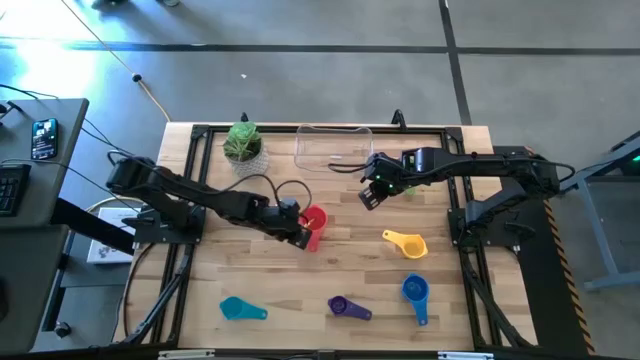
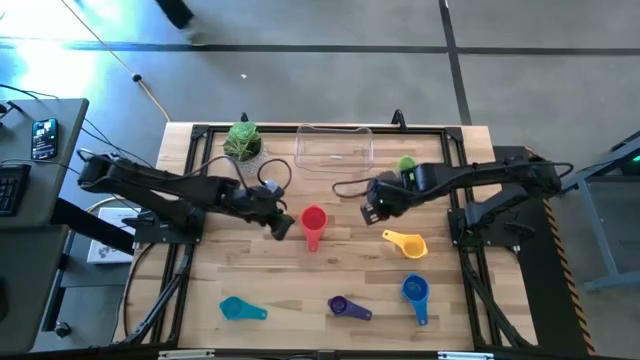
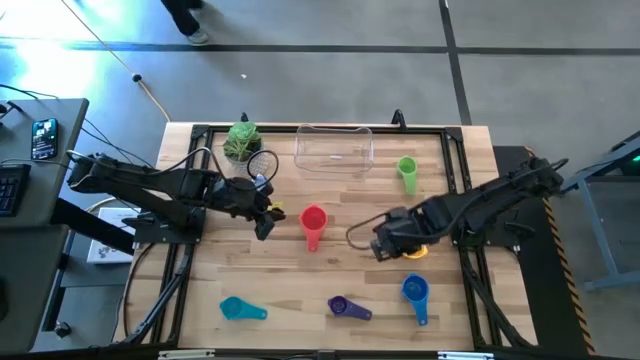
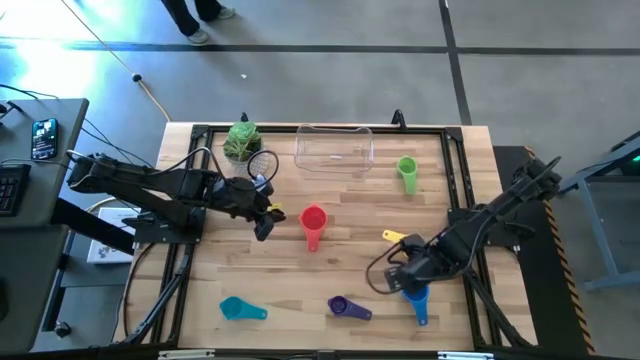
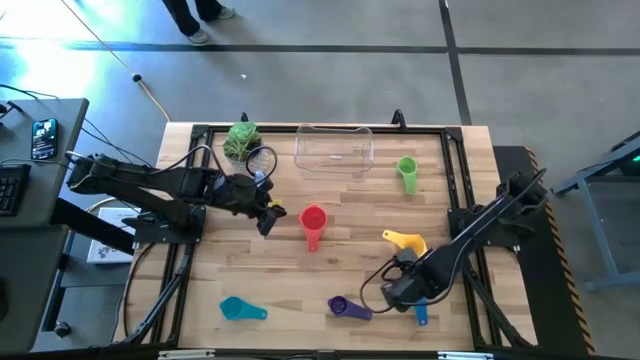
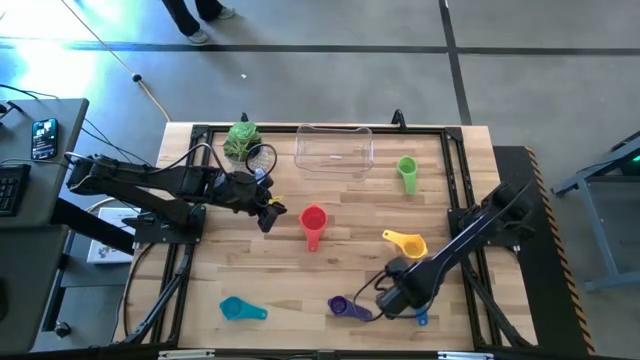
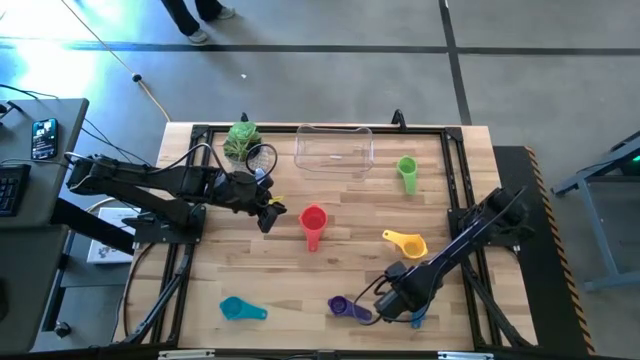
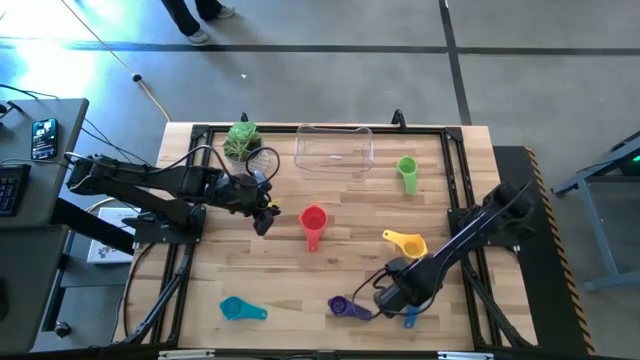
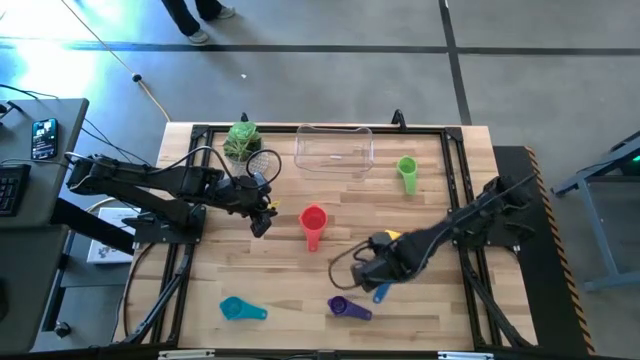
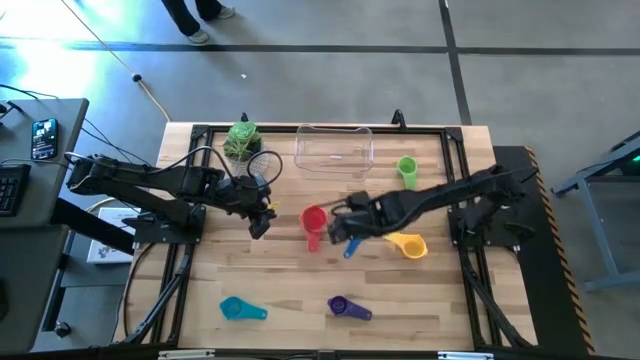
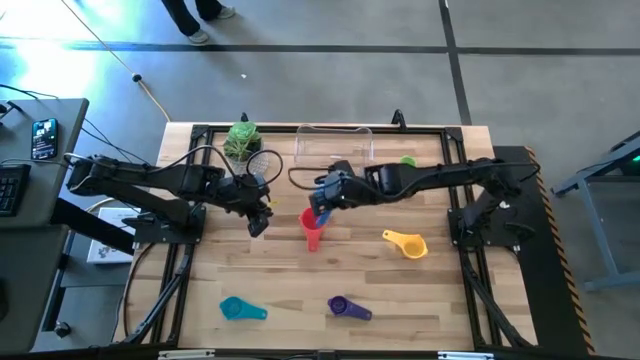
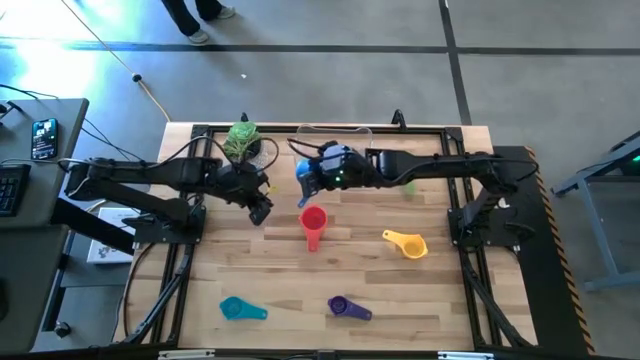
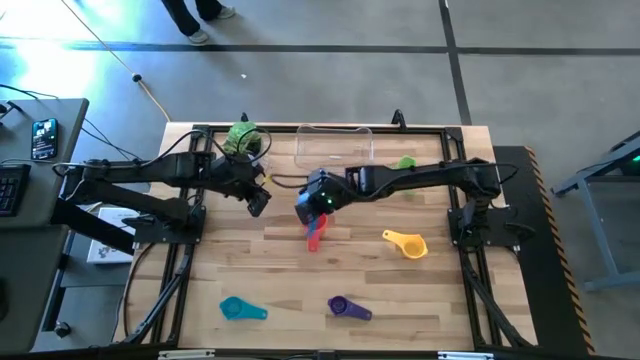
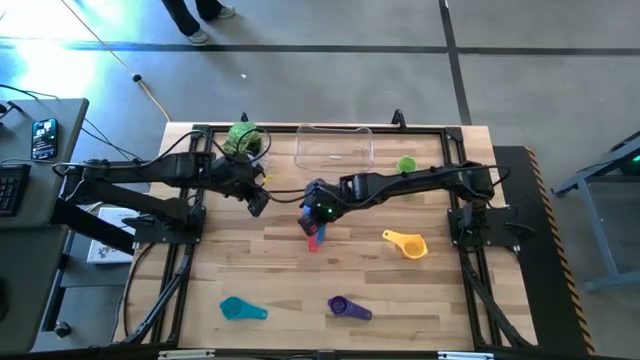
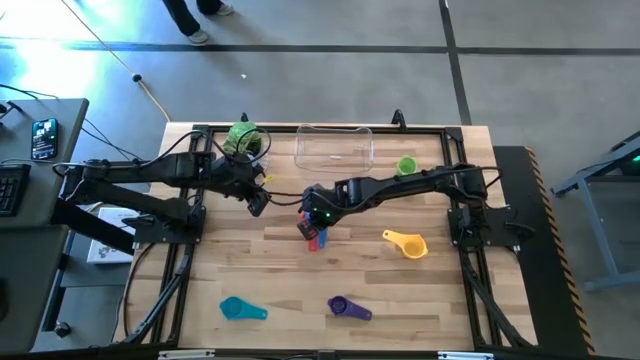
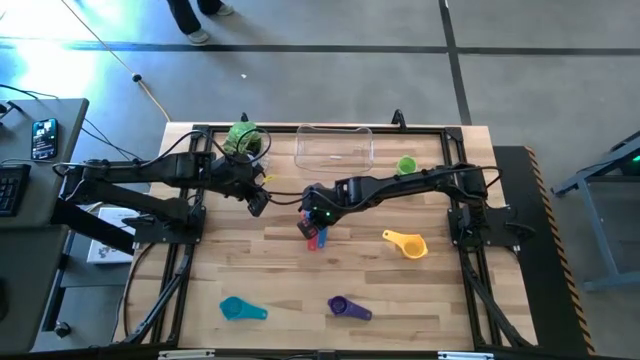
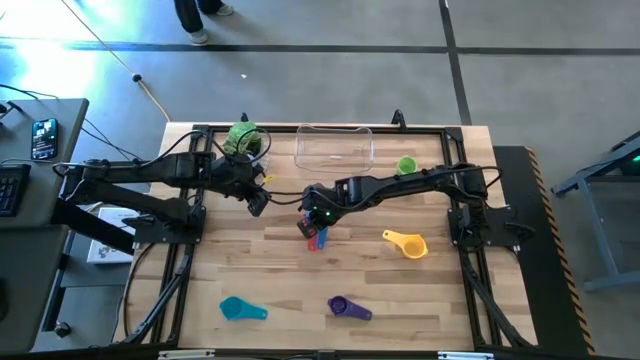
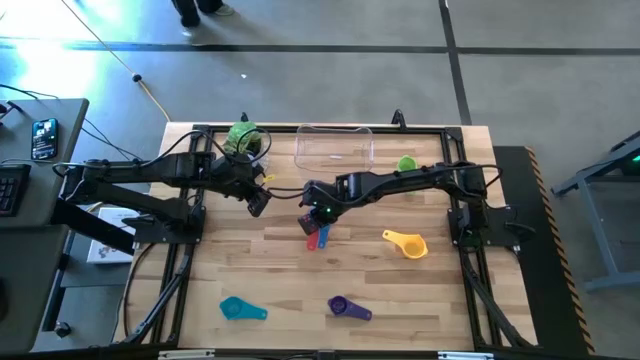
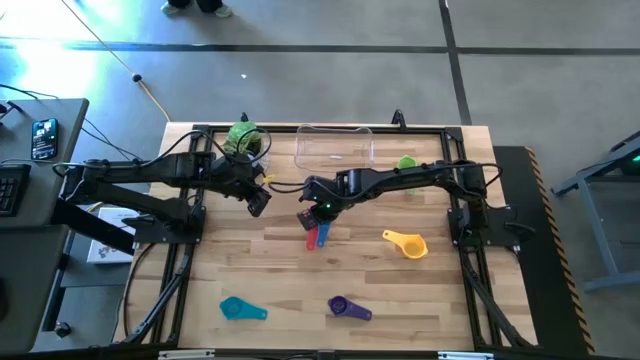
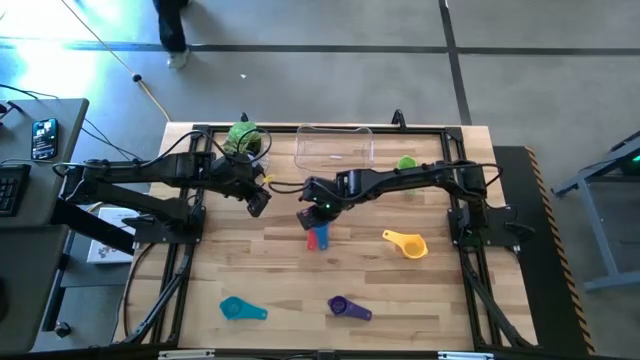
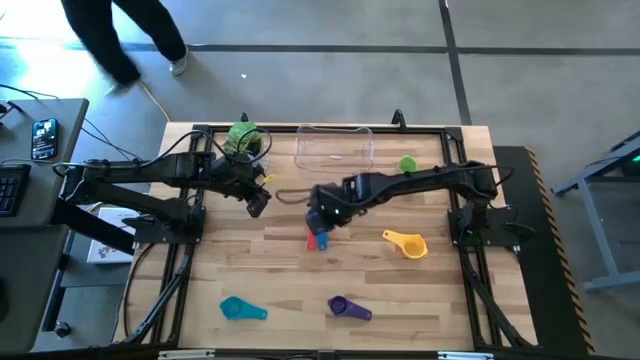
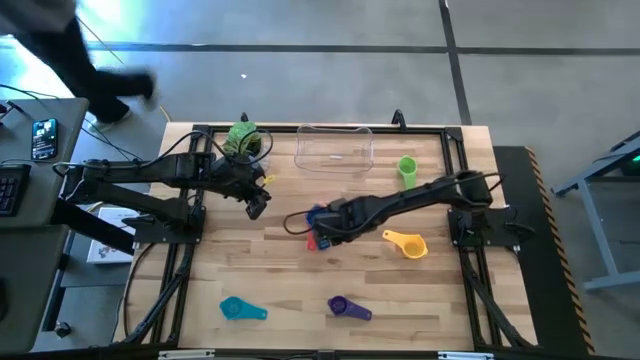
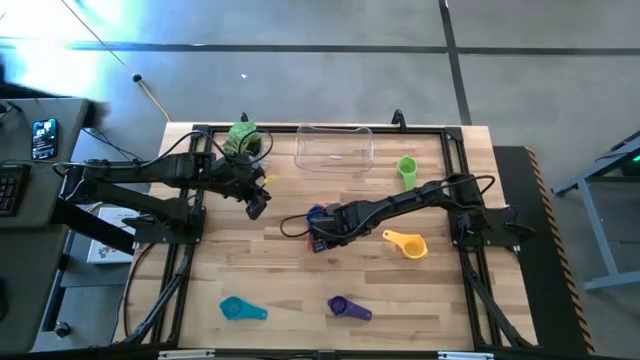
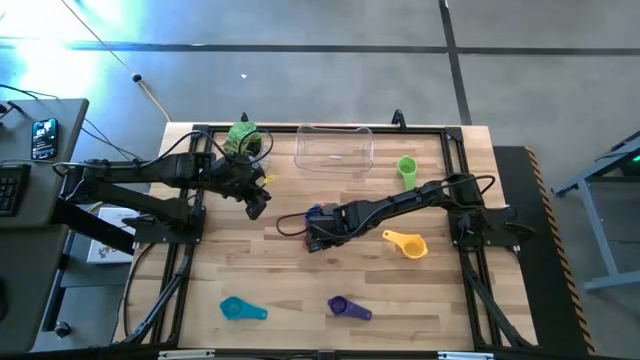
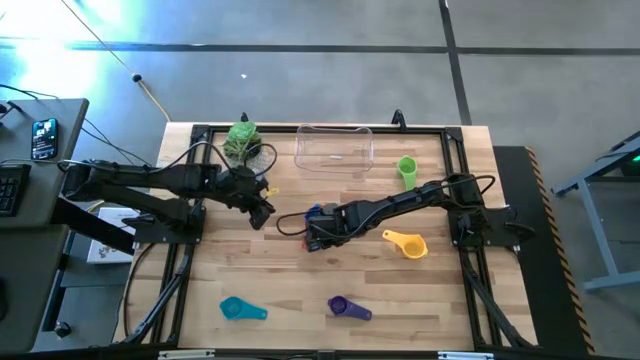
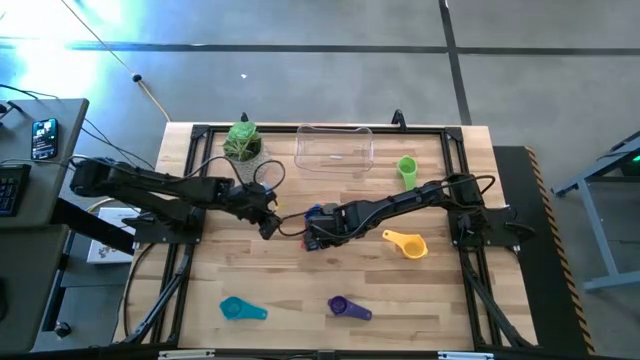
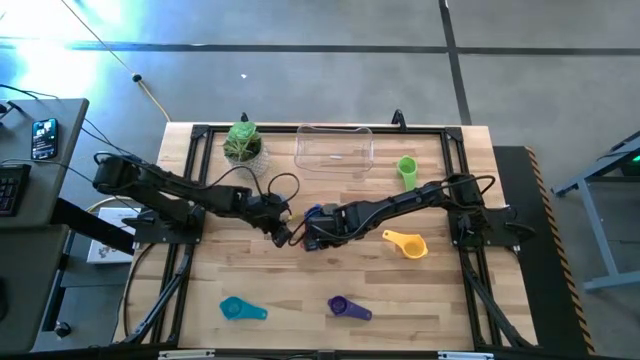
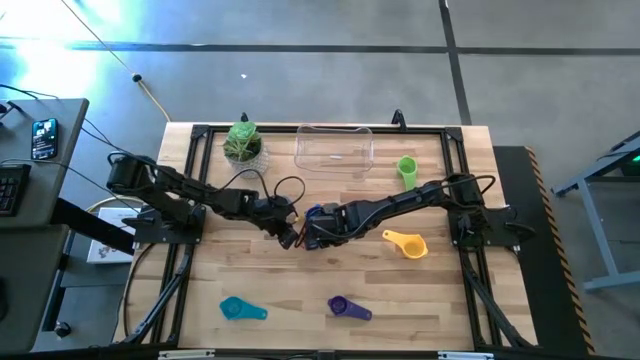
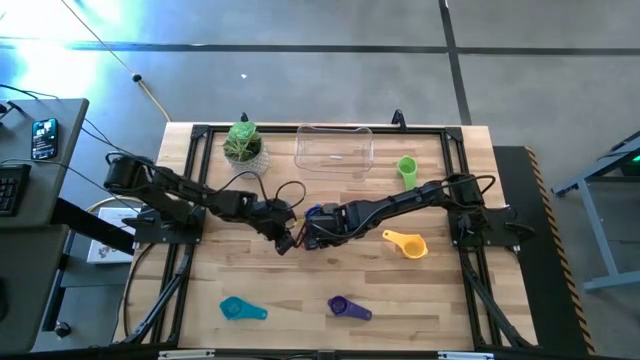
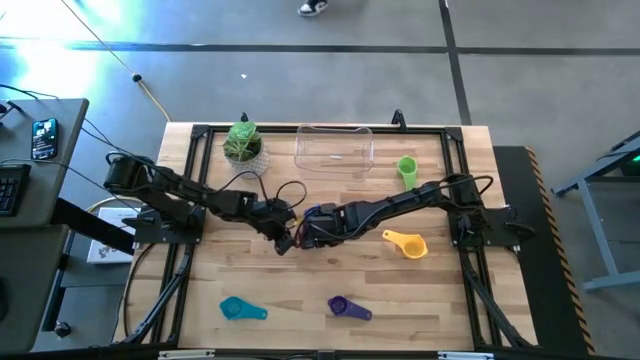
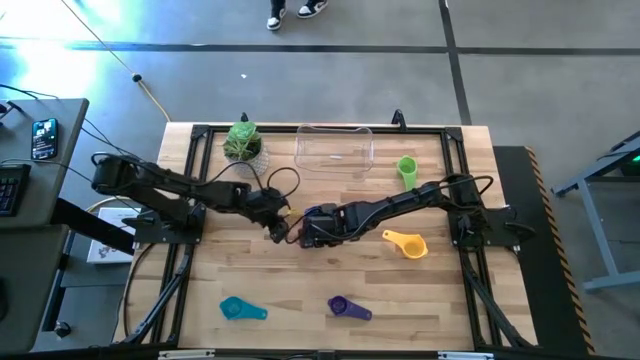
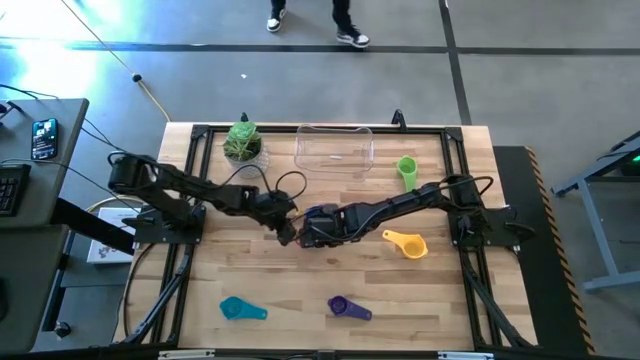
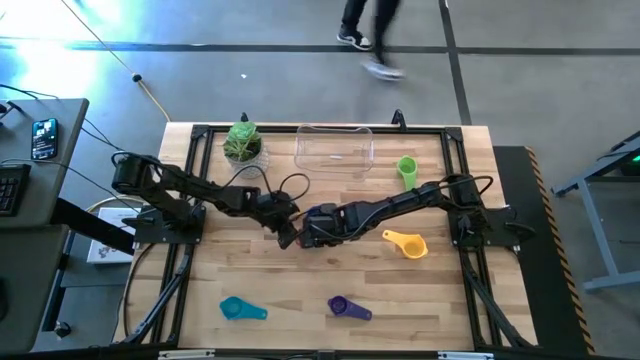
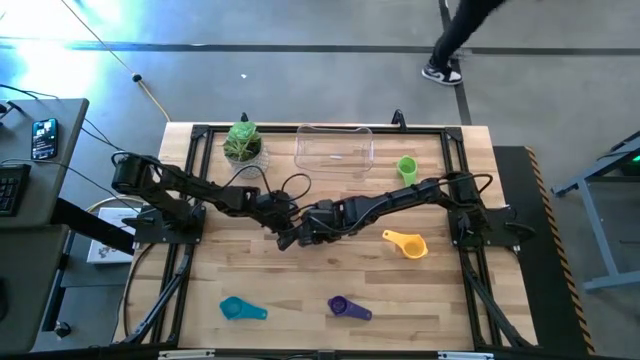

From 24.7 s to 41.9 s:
Task: Nest measuring cups in basket
Stack the blue measuring cup on top of the red measuring cup

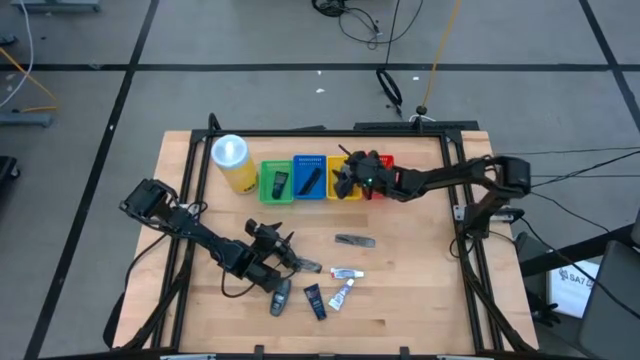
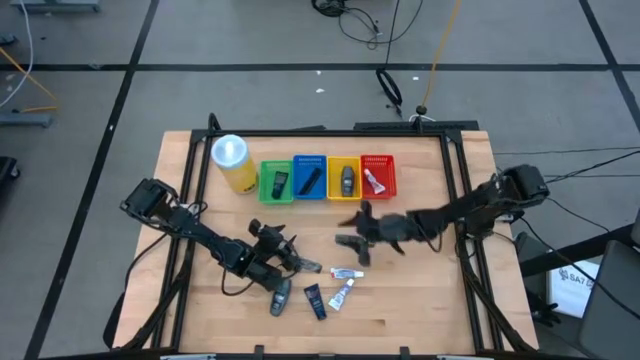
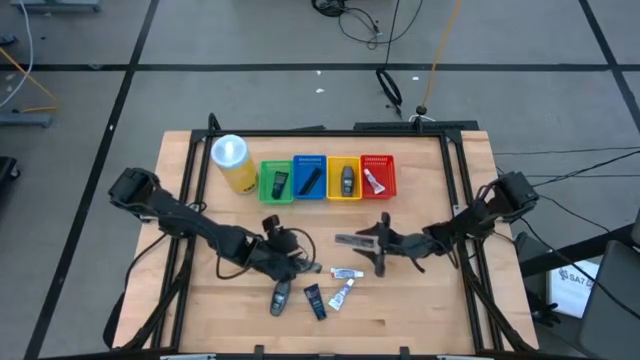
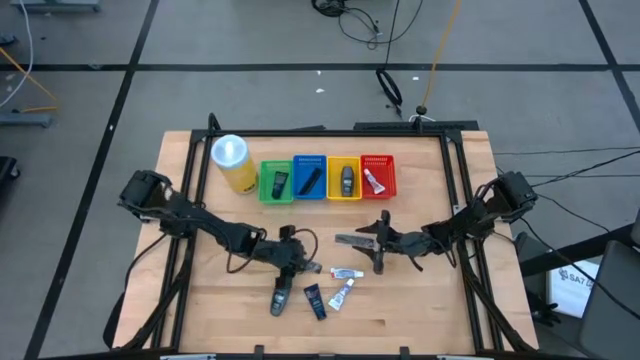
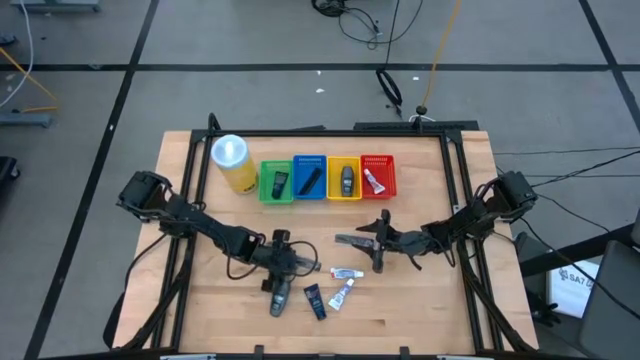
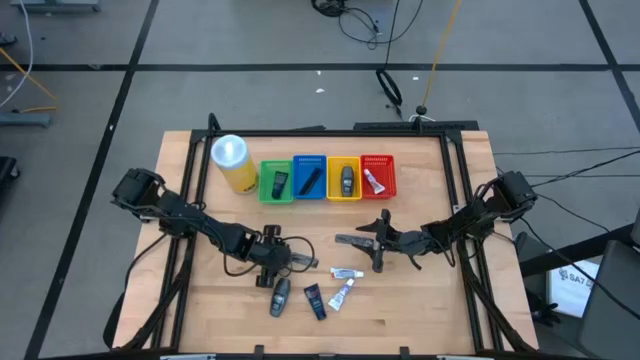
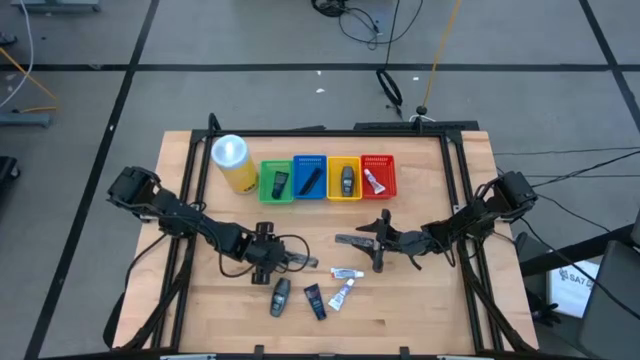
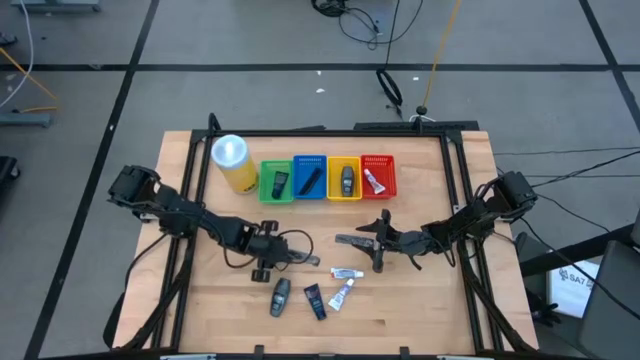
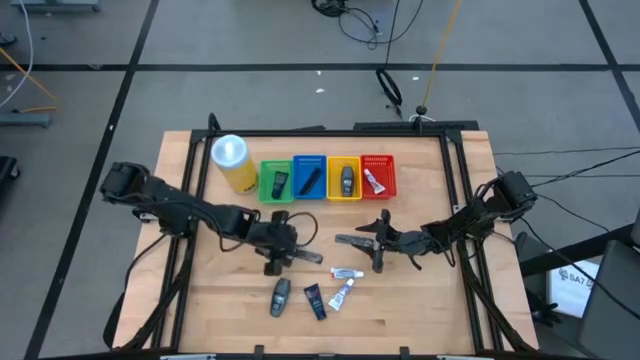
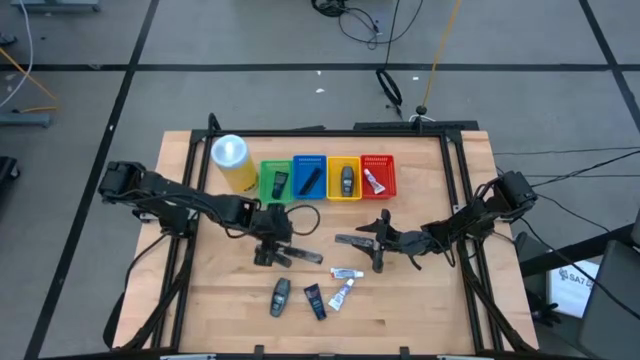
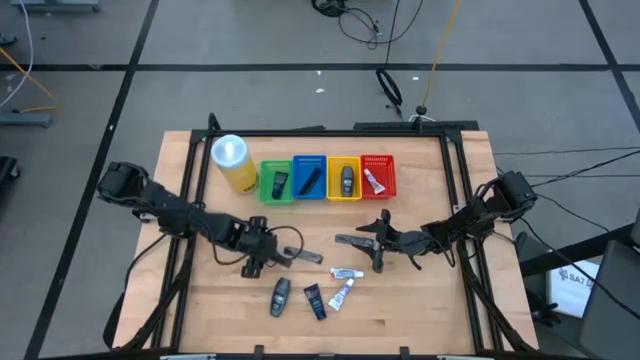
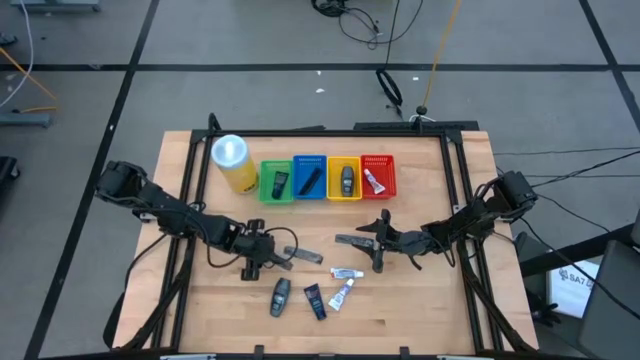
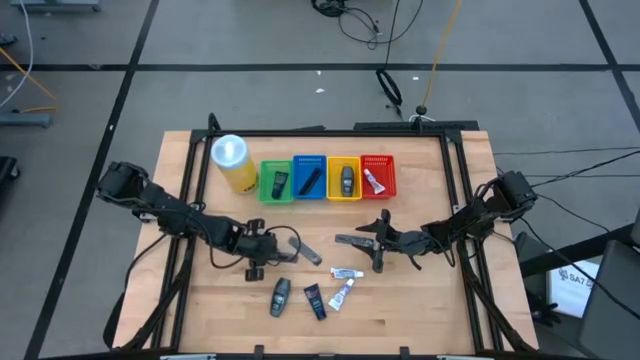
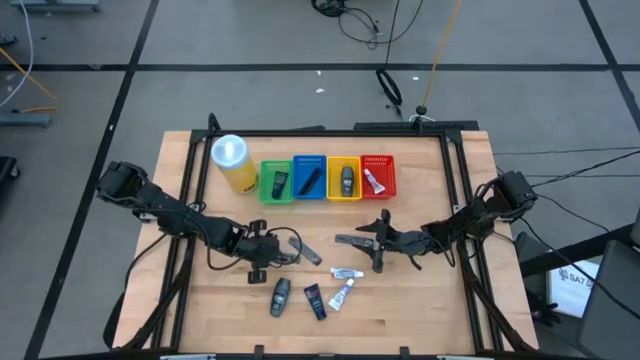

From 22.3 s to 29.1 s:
Task: Pick & Place Travel size toiletries
Put the hair comb into the blue basket
